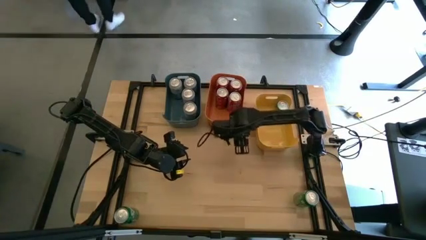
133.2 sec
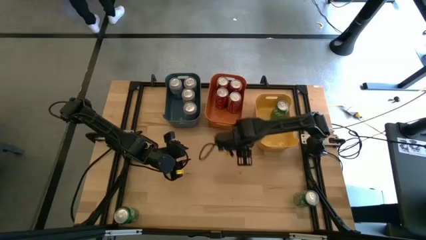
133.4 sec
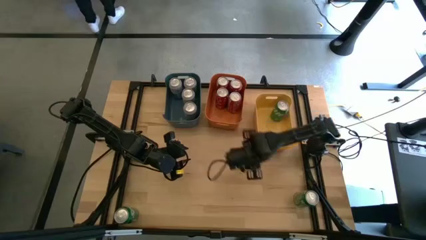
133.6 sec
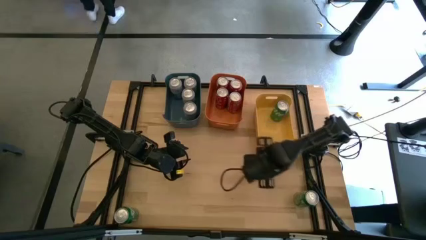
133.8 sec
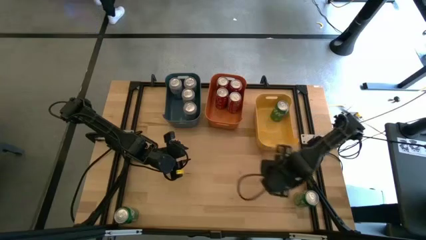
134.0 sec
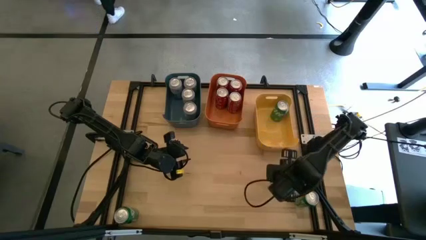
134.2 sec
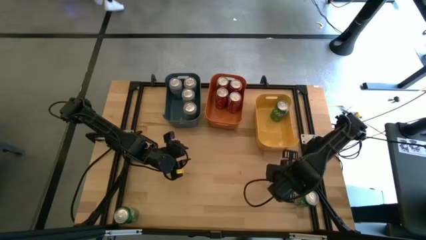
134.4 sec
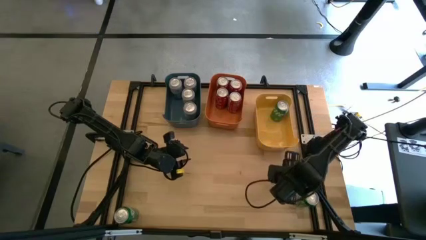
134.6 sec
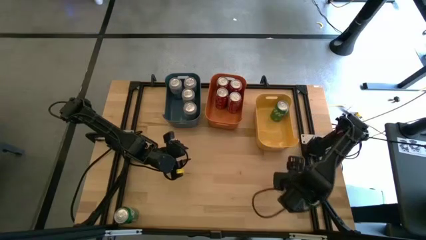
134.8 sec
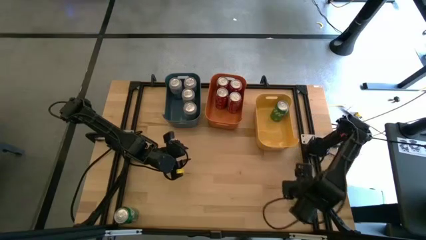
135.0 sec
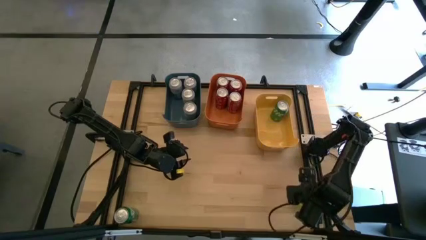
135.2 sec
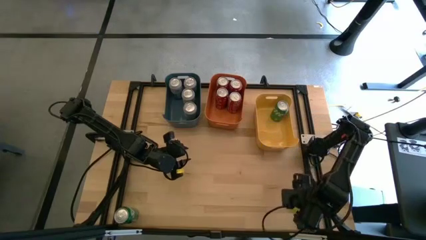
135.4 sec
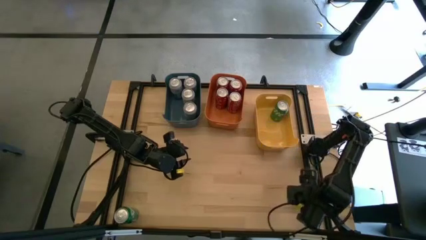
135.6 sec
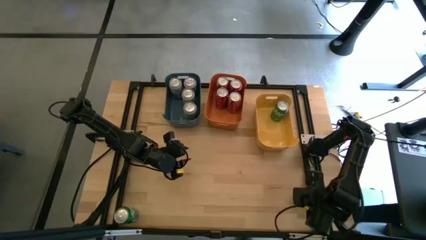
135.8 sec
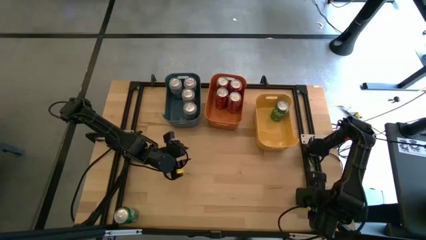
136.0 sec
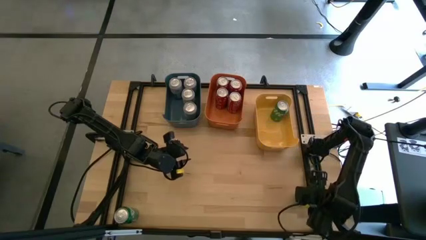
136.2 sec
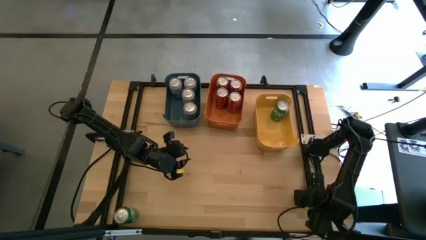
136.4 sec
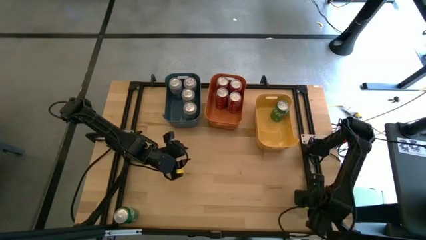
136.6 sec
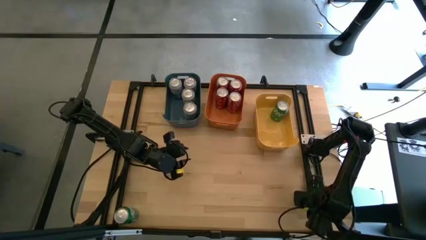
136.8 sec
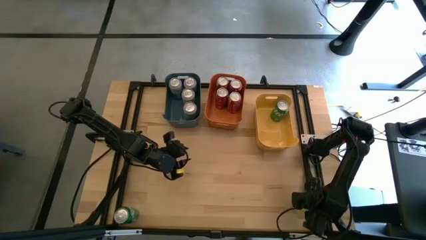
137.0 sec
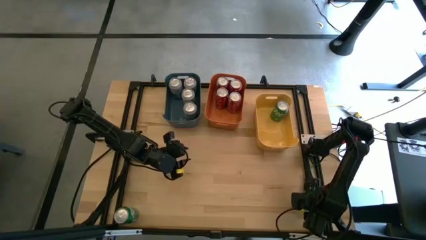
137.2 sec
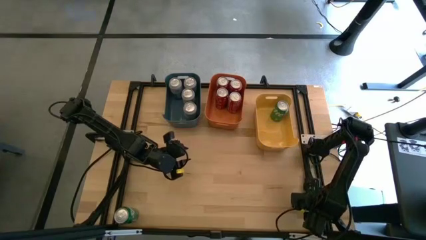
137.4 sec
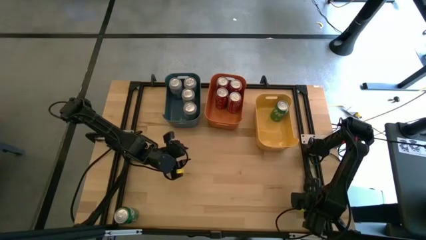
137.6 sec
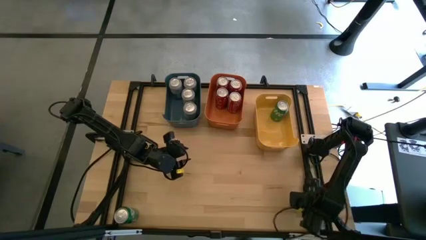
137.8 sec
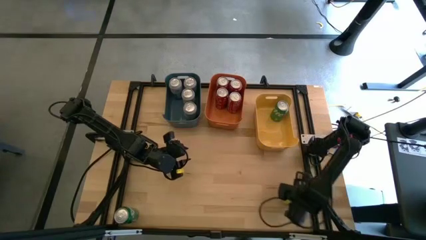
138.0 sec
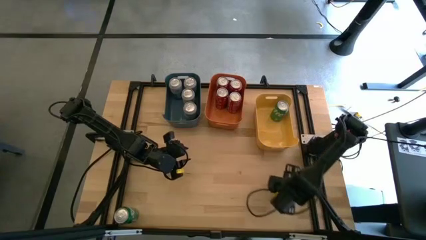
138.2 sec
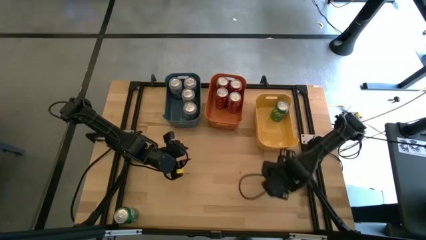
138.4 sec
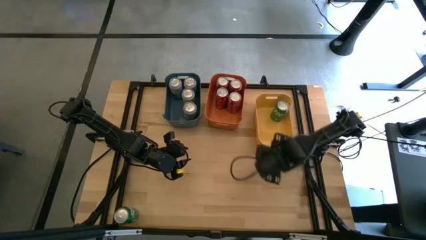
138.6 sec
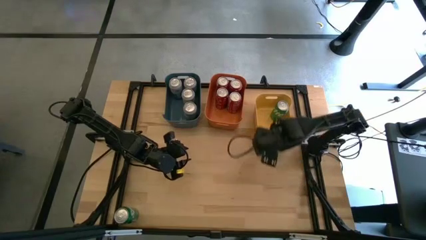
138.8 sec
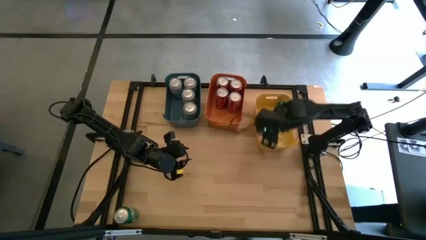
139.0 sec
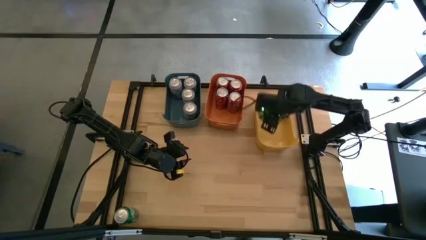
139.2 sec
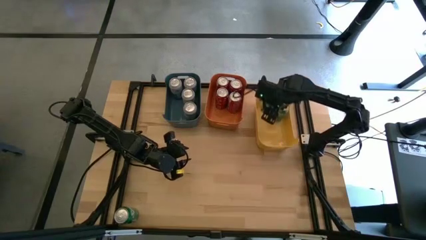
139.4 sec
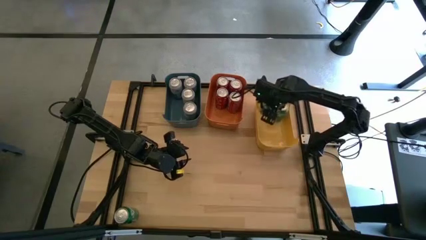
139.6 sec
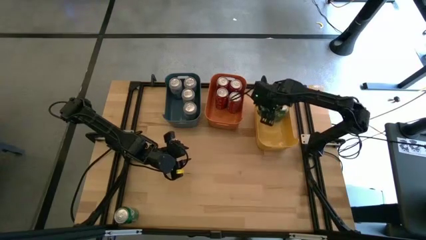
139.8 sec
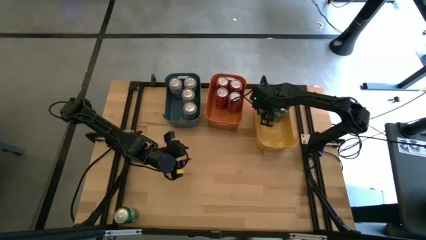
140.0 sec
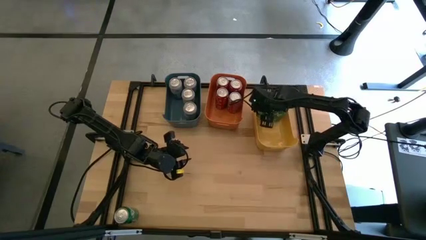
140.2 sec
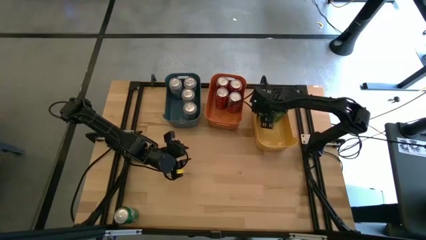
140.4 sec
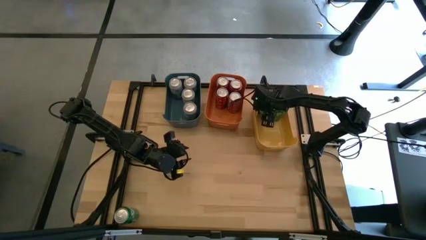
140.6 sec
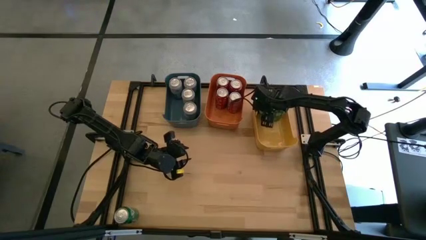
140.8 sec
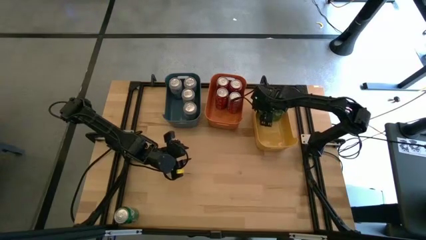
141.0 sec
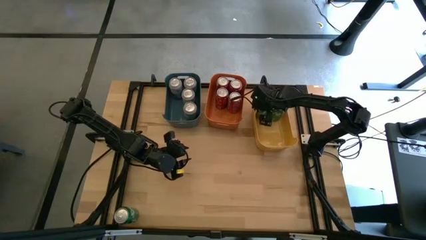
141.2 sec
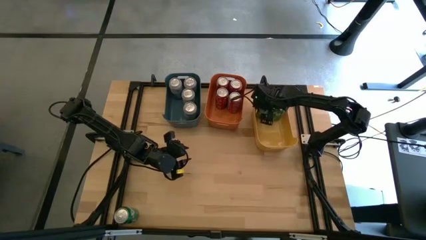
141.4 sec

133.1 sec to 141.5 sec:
Task: Sort soda cans
Put the bottom right green soda can into the yellow bin

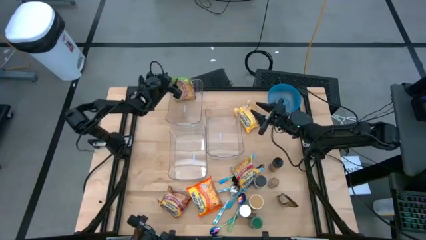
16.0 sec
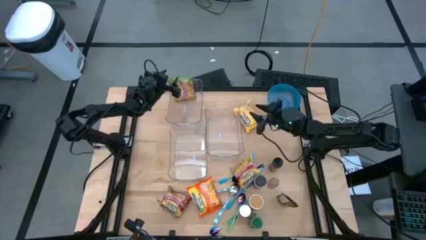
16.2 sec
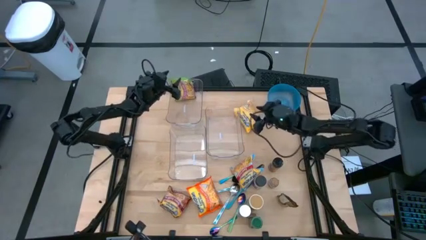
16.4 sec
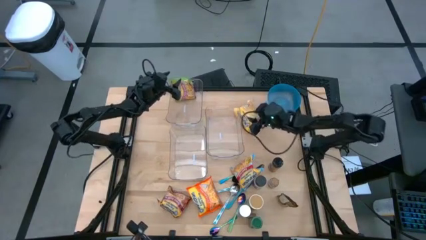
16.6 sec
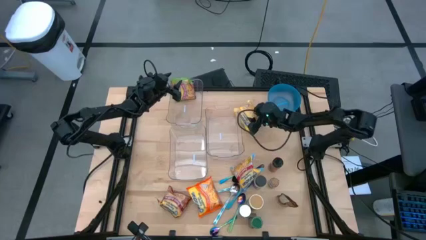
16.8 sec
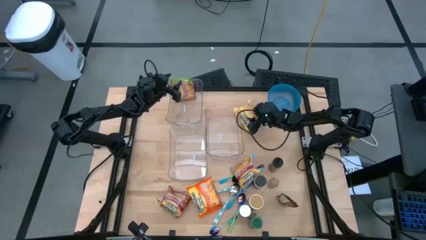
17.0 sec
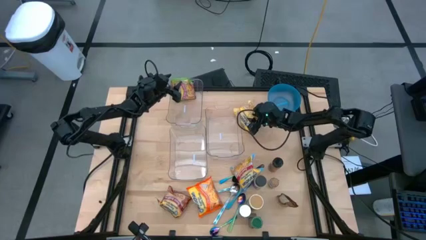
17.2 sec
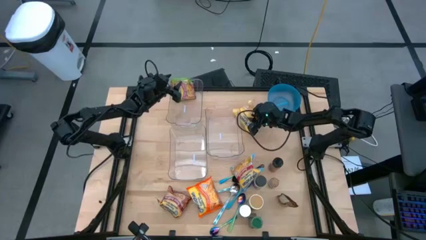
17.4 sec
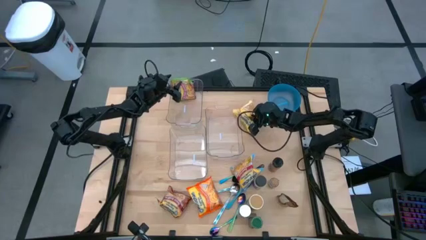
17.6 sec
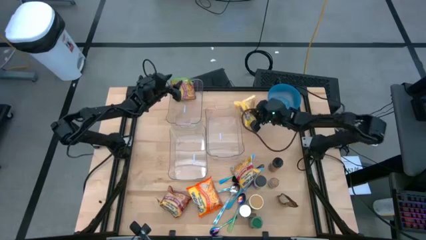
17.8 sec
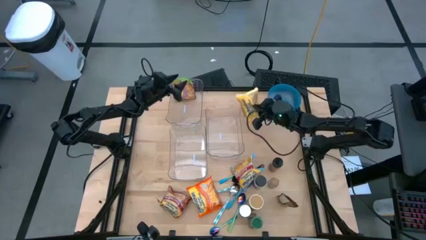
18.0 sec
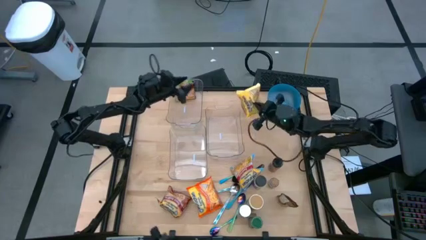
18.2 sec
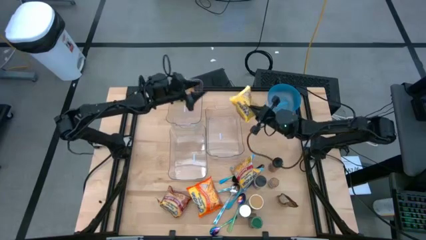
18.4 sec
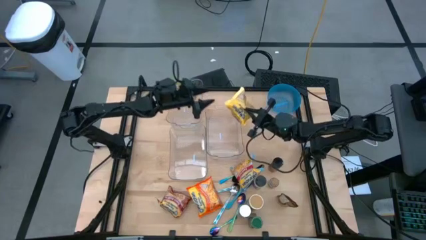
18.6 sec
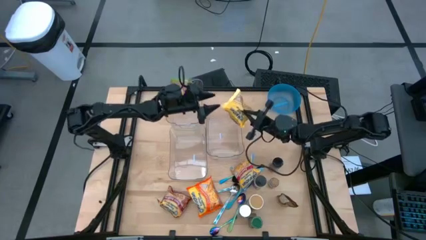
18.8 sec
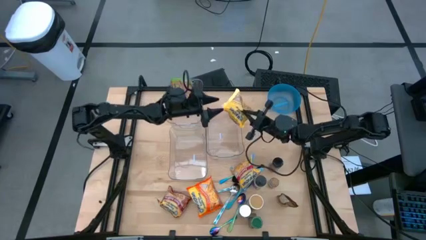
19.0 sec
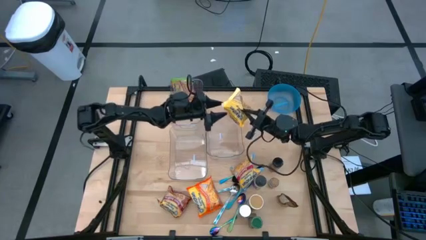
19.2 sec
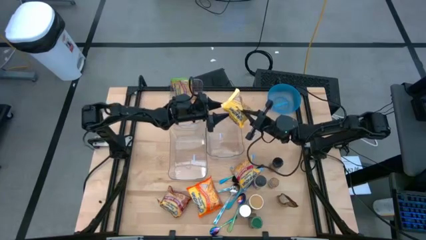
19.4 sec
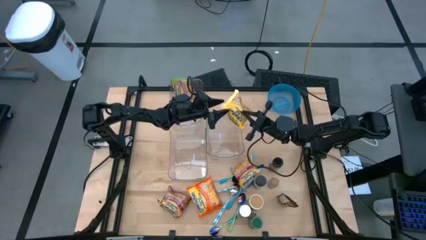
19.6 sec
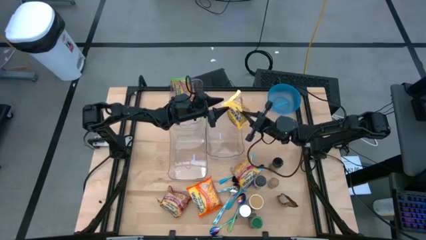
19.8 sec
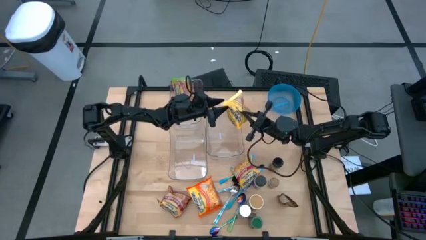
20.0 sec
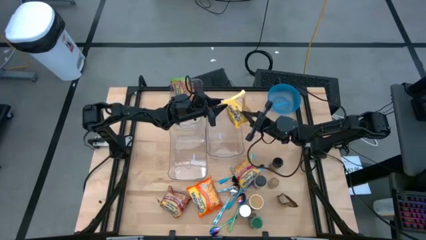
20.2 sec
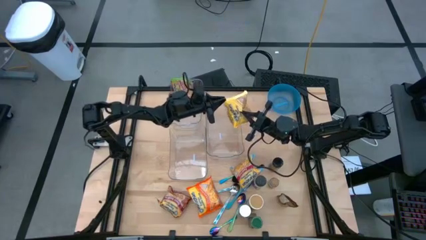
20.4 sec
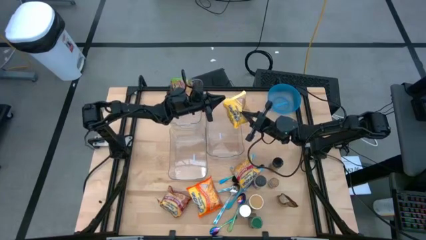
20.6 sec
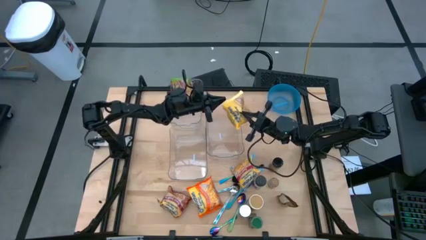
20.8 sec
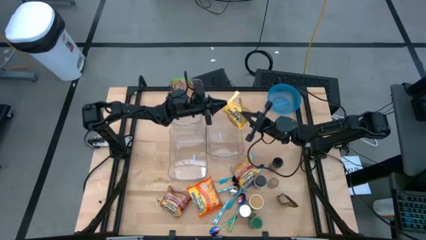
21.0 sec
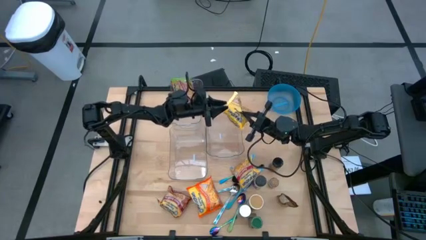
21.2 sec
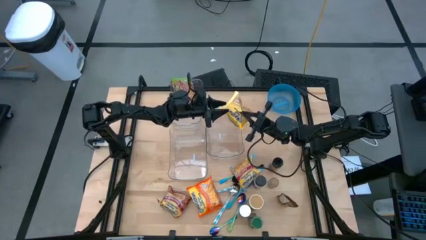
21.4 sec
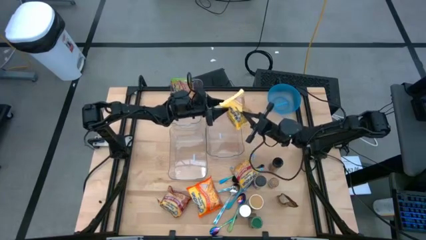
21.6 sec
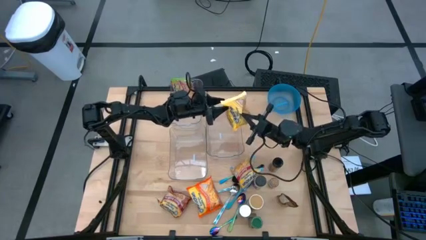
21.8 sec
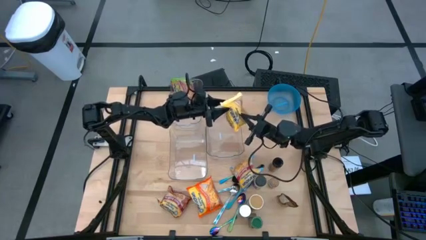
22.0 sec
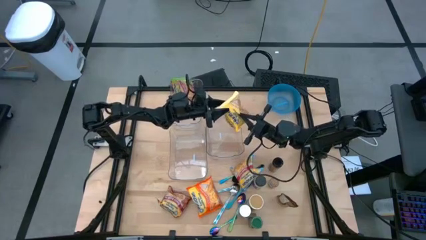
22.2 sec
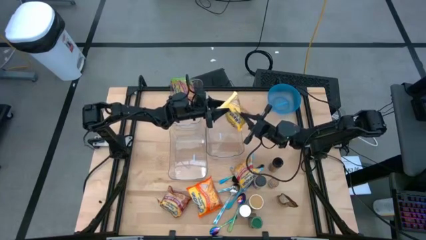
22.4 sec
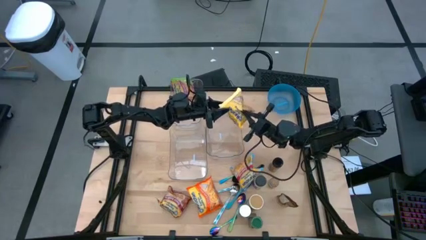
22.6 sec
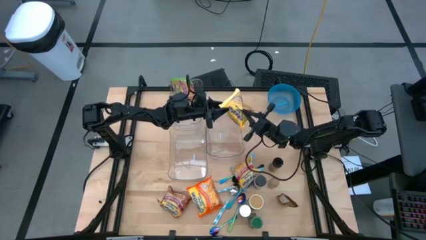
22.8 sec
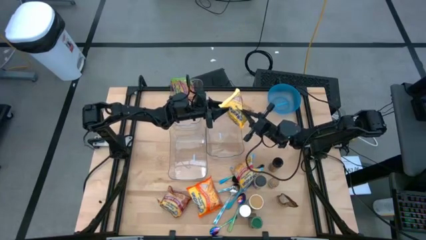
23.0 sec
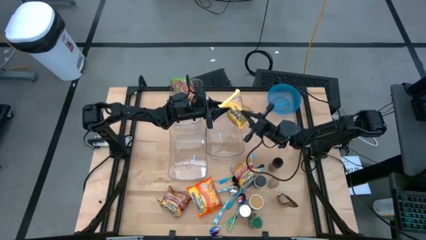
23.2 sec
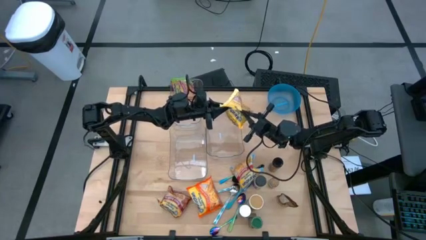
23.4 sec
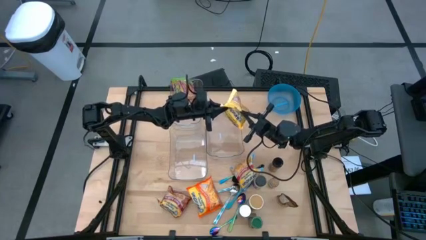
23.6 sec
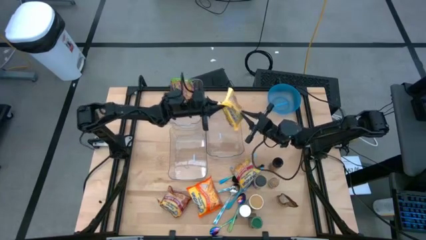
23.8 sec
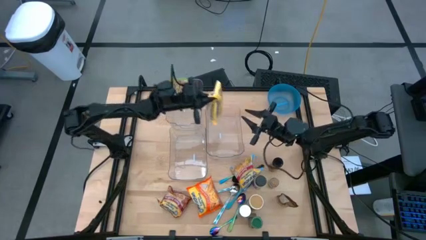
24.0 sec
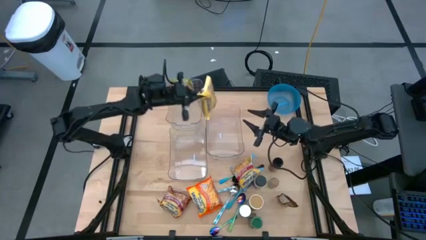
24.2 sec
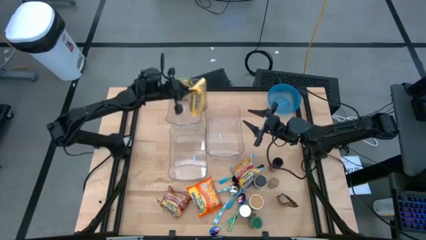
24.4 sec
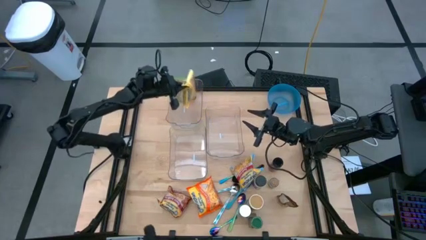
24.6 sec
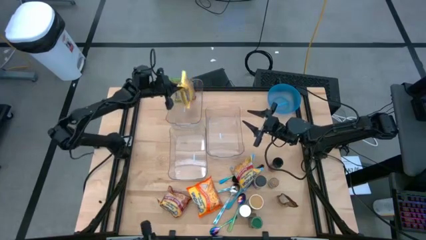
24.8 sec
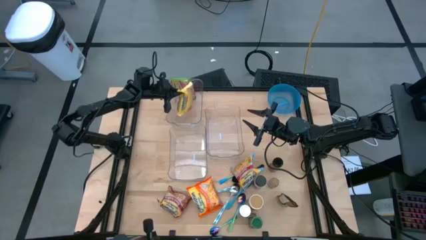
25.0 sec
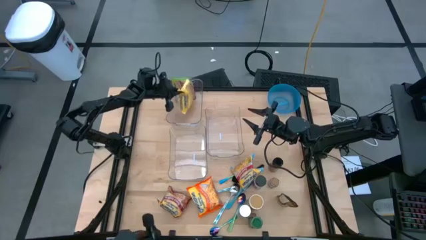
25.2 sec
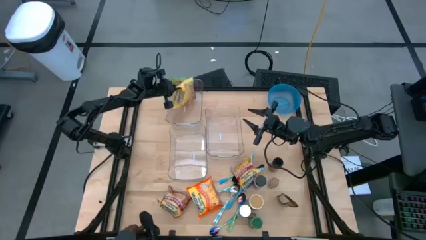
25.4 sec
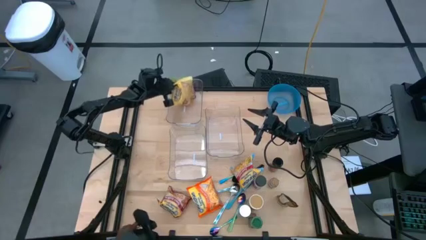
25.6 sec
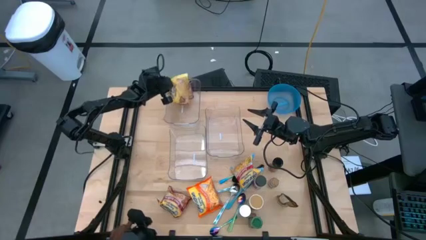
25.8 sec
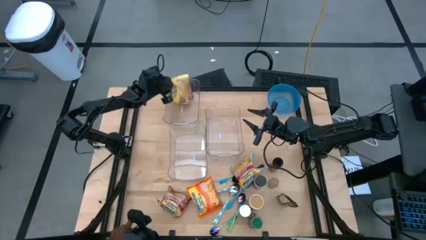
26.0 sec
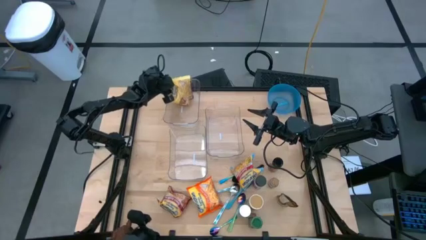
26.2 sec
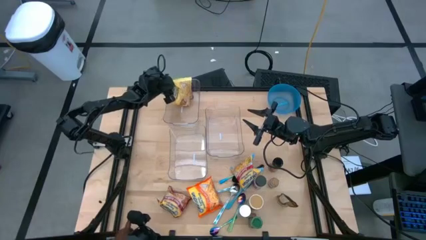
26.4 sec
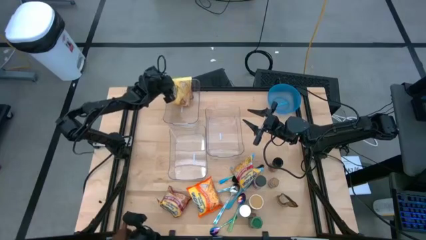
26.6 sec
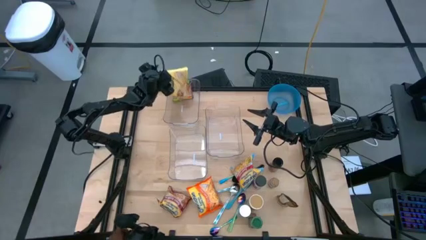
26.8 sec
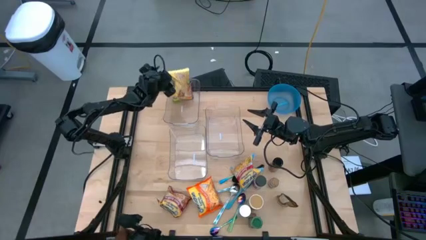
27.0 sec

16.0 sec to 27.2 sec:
Task: Pick & Place Food Item
Put the yellow noodle pack into the top transparent bin
